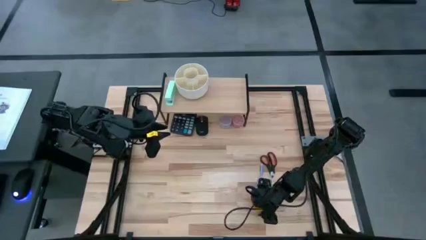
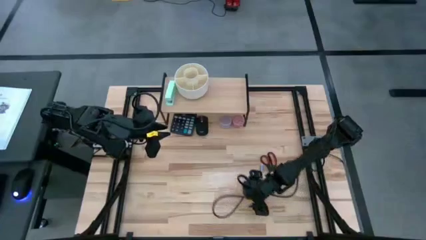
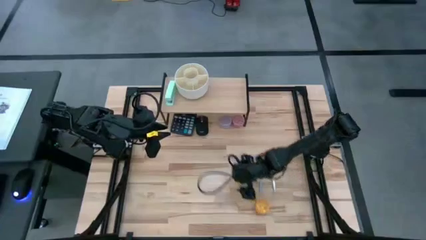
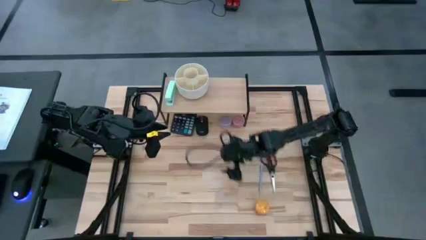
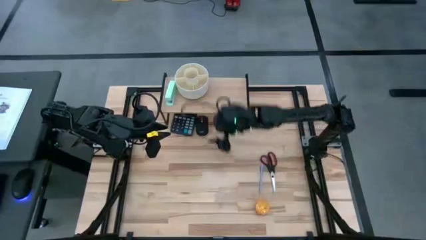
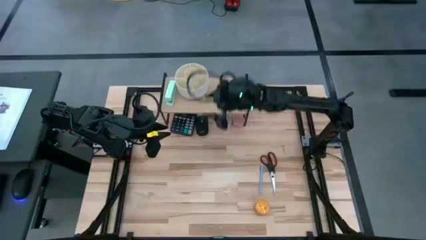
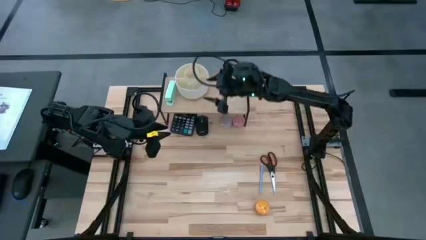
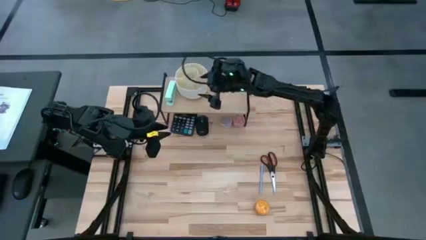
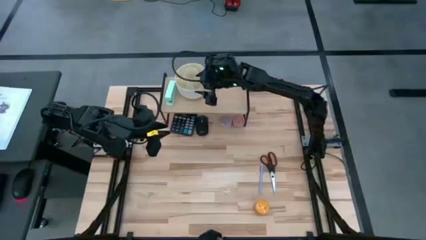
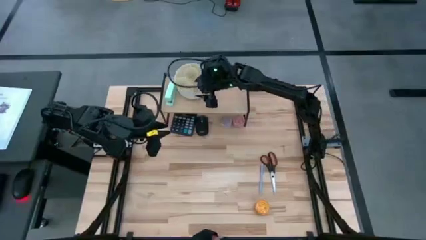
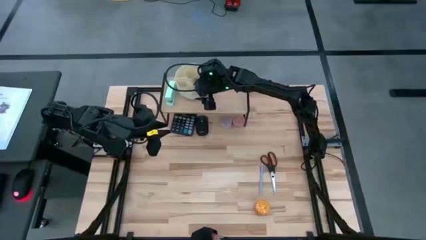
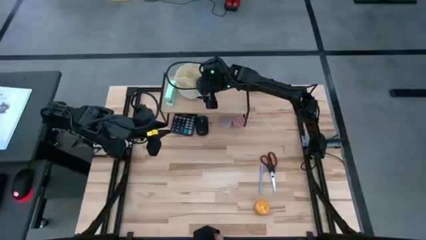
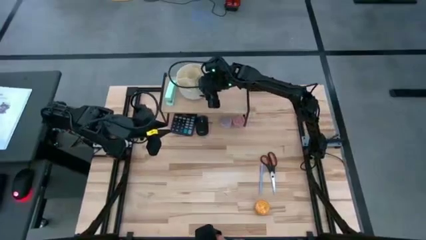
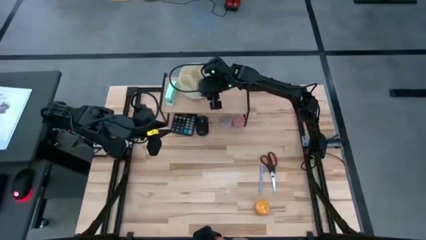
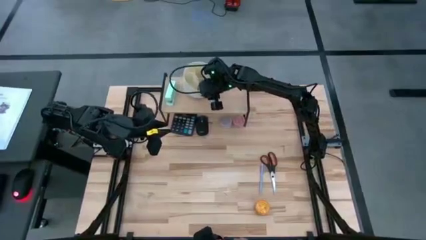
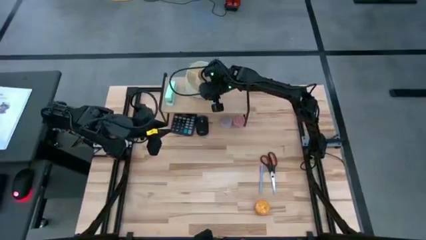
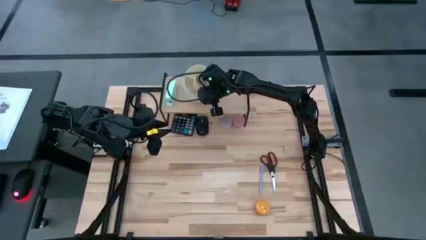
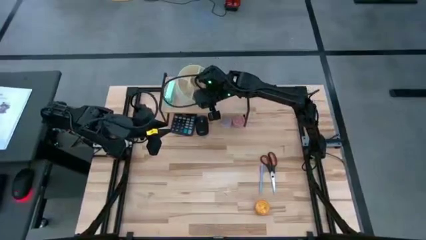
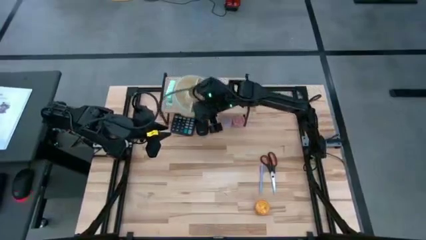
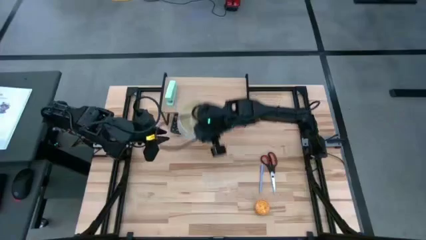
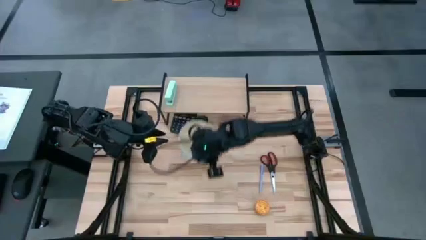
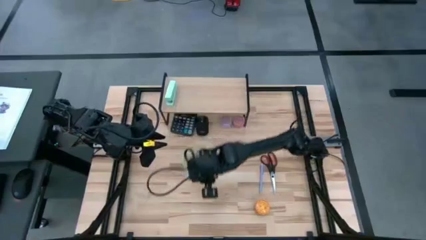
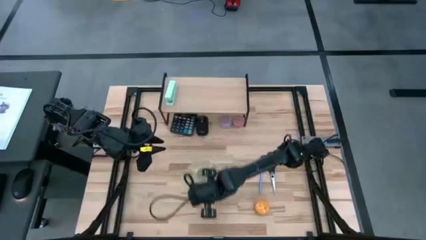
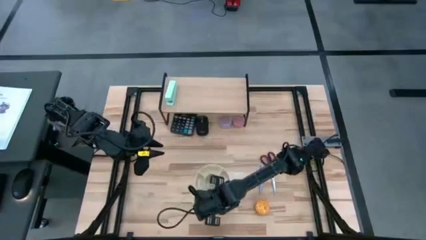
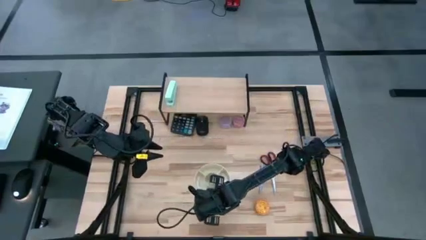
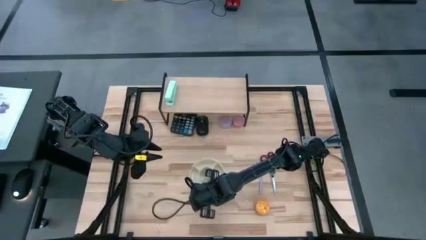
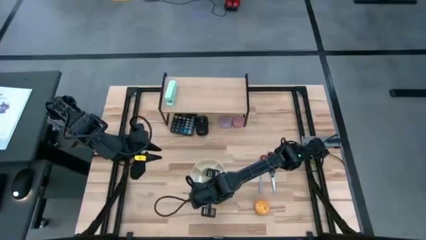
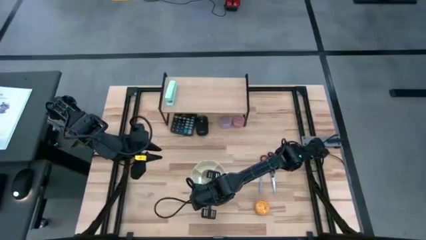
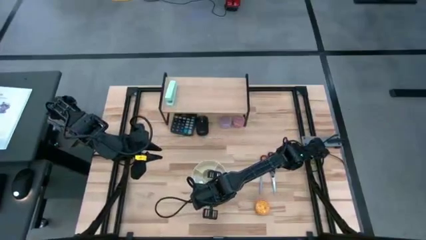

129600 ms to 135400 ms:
Task: Stock shelves
Remove the white desk organizer from the shelf

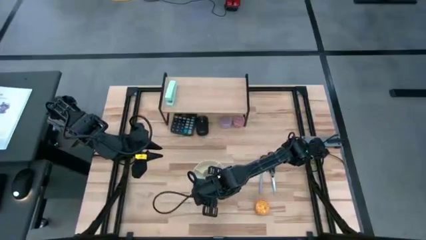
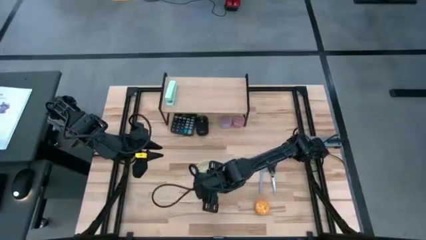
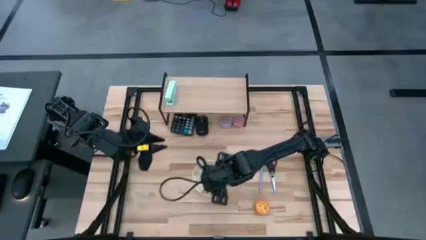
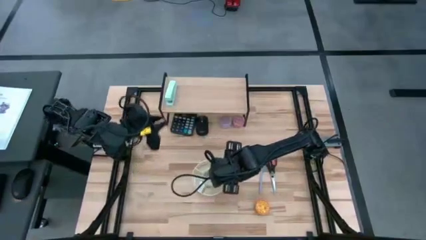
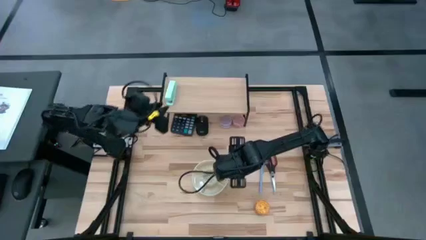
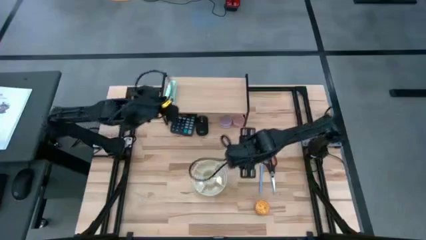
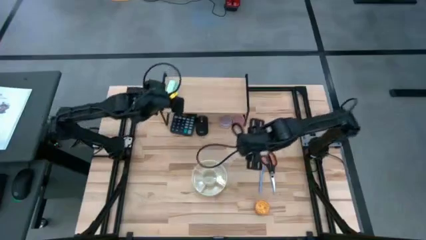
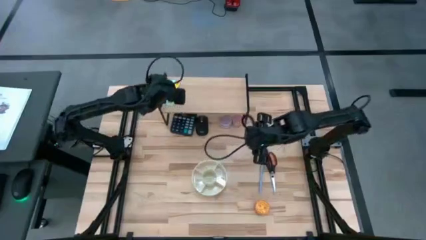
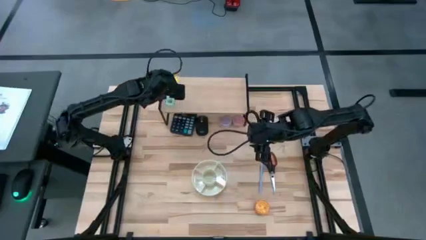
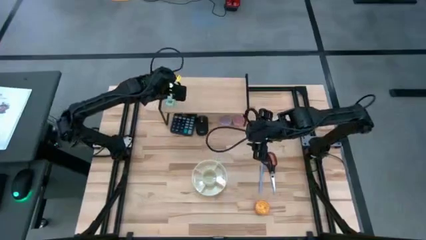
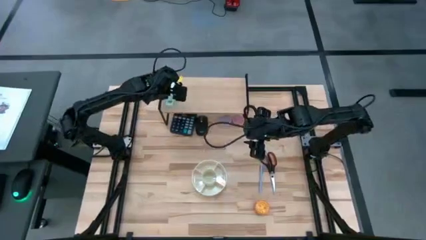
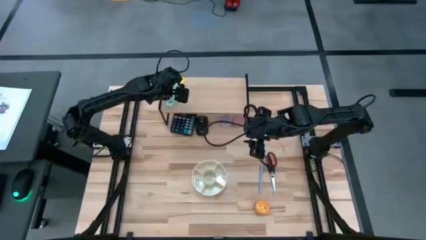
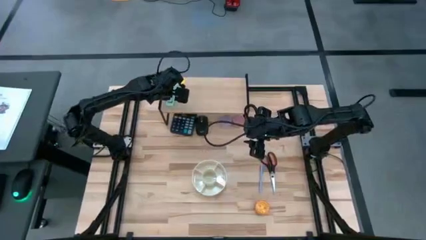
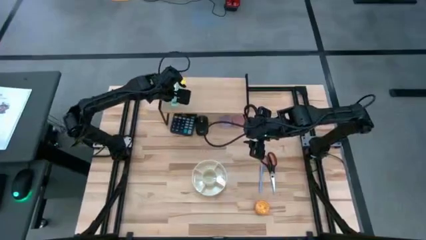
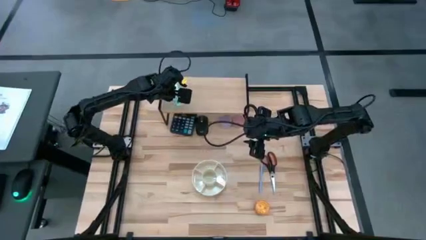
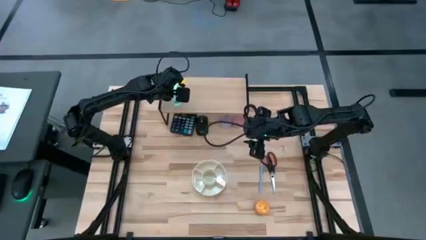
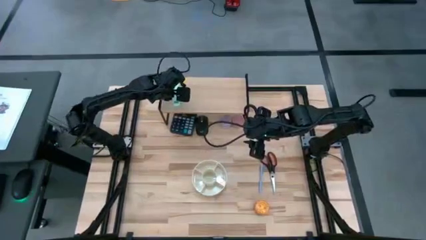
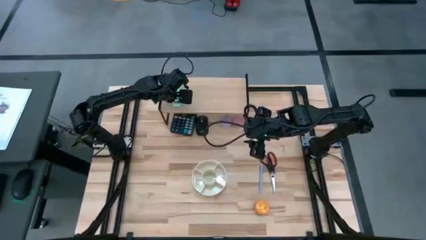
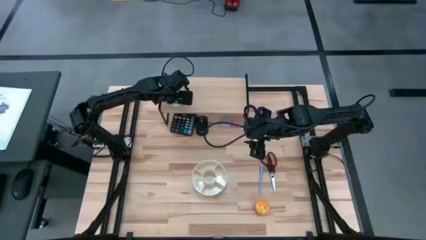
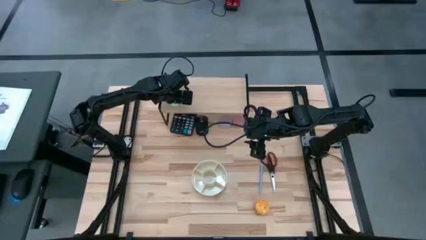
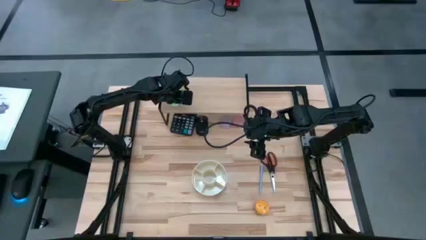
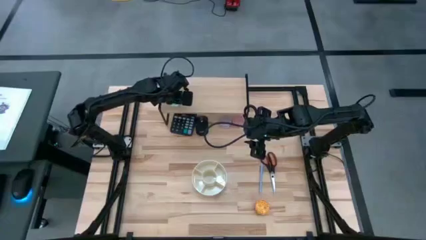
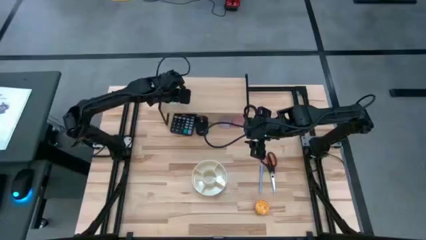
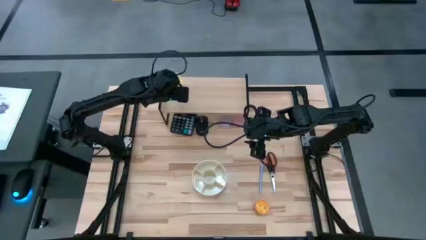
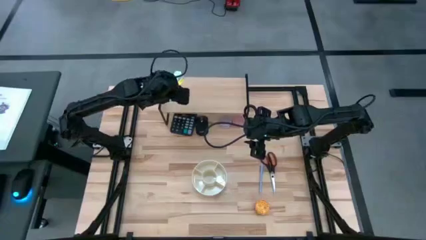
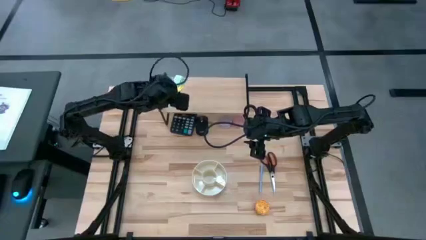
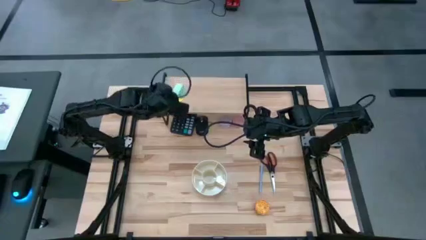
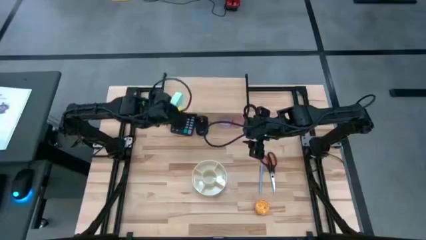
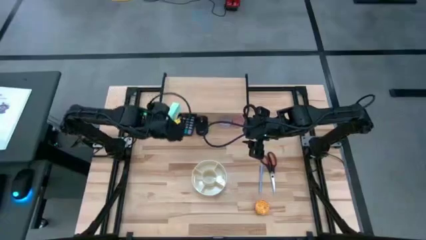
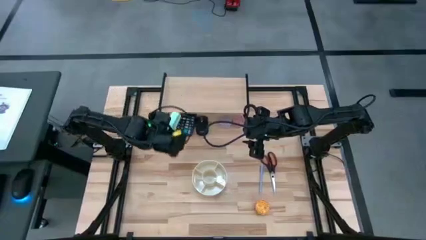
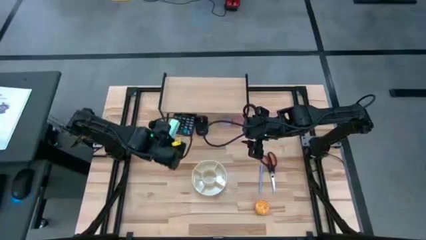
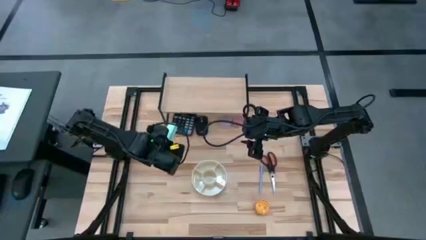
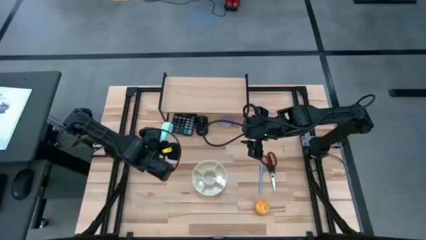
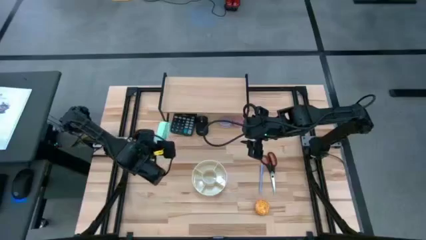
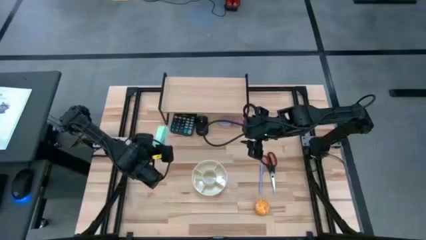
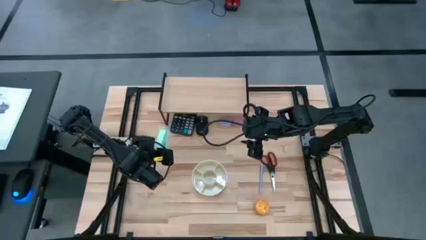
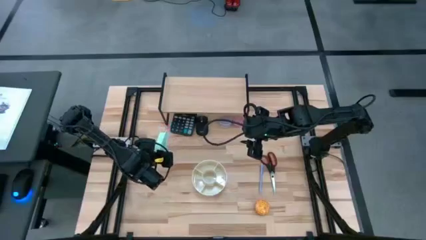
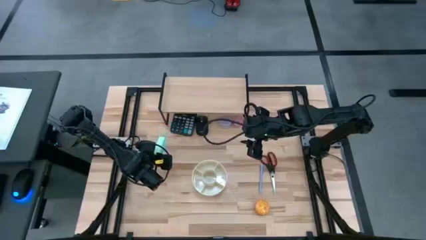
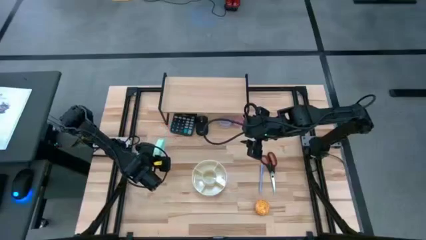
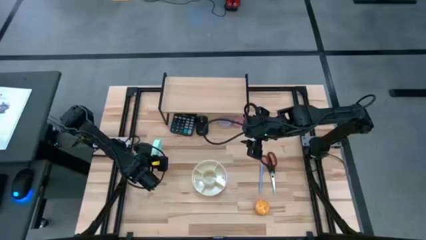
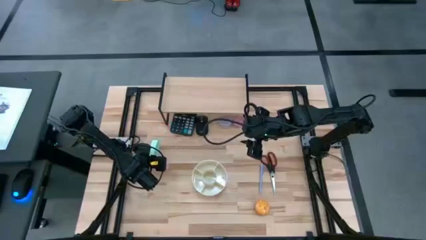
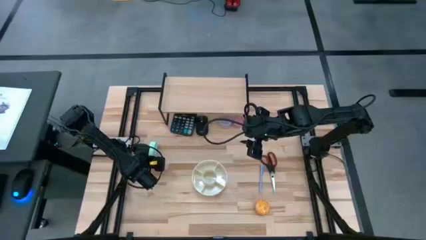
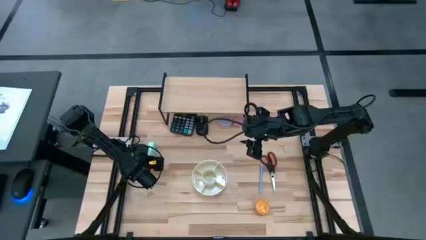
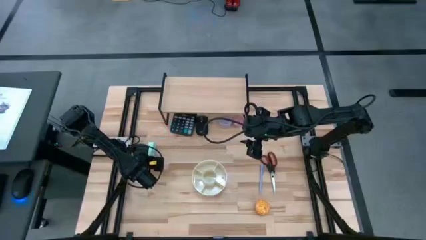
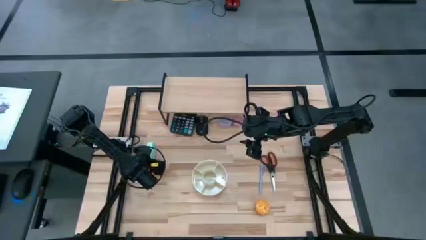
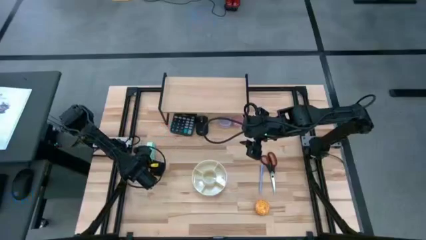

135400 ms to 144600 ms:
Remove the blue stapler from the shelf
